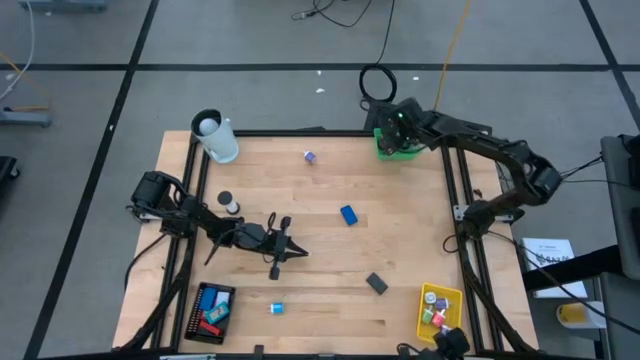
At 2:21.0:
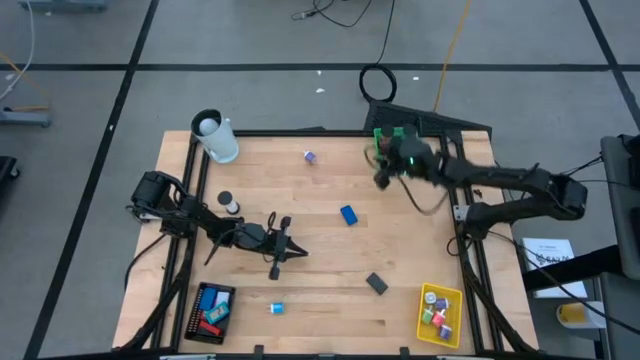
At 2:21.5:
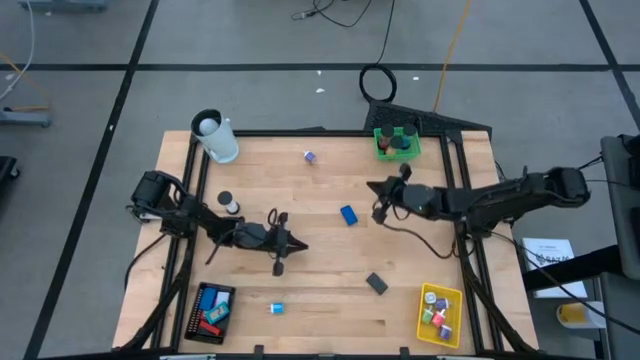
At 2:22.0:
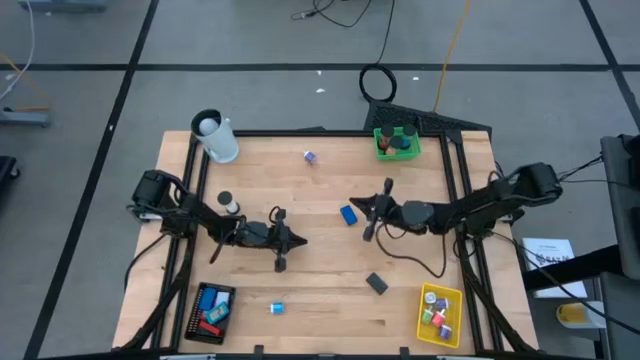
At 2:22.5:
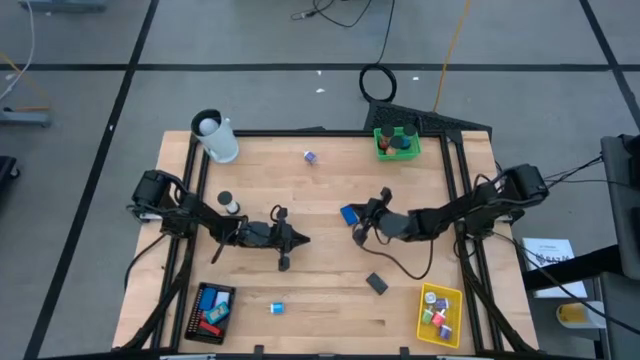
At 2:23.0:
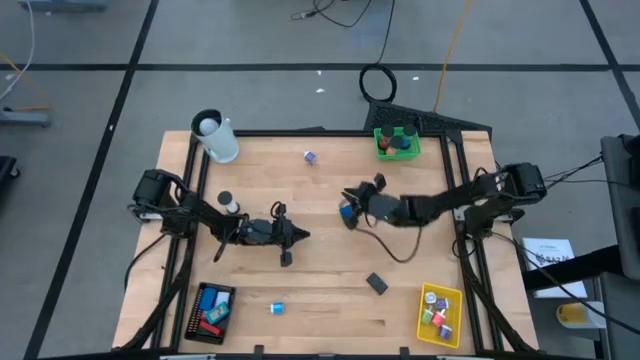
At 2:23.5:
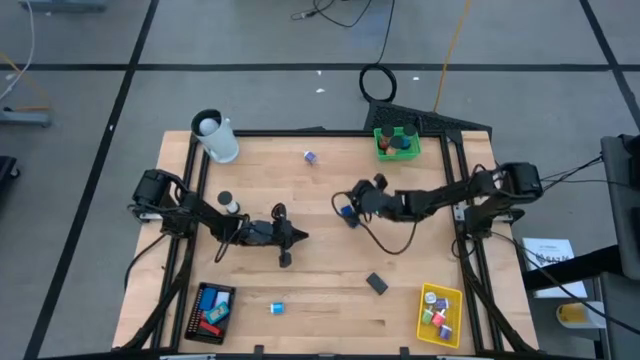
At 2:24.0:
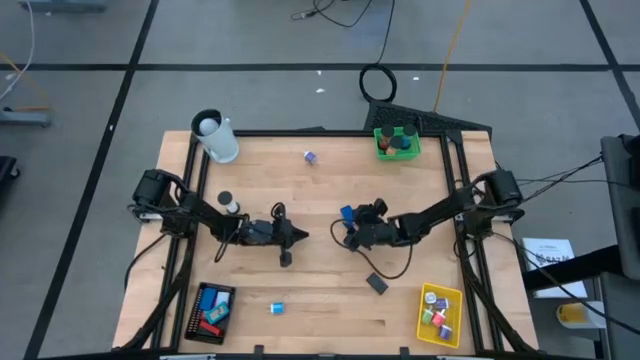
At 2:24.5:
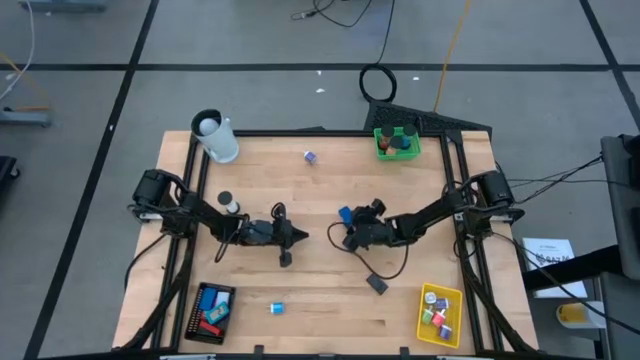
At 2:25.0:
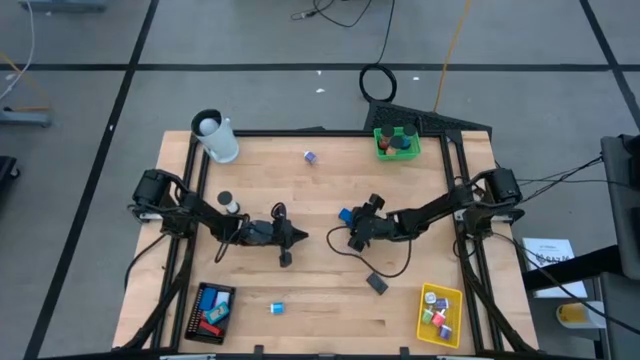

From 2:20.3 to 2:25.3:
Task: Pick & Place Office items
Put the blue digital clock into the black bin

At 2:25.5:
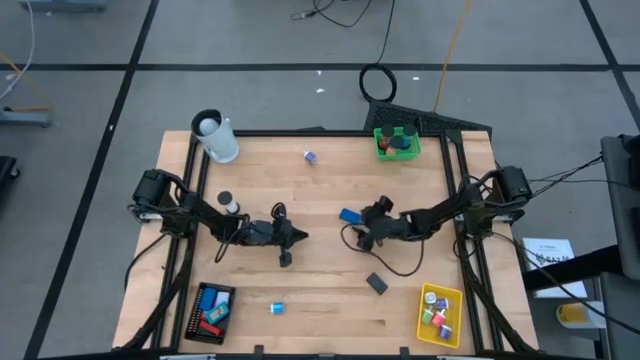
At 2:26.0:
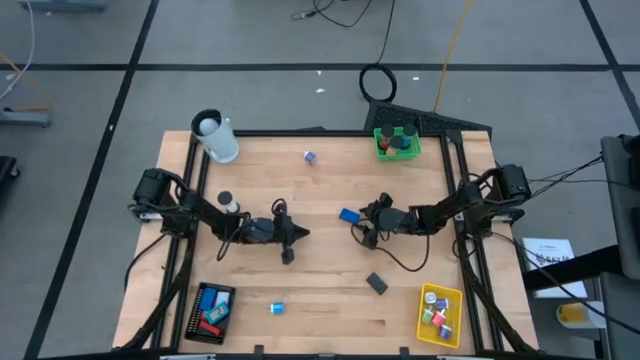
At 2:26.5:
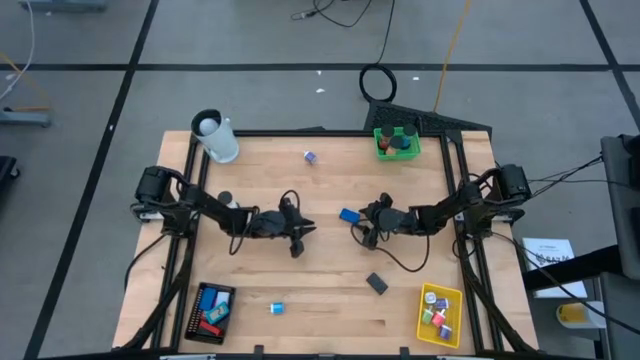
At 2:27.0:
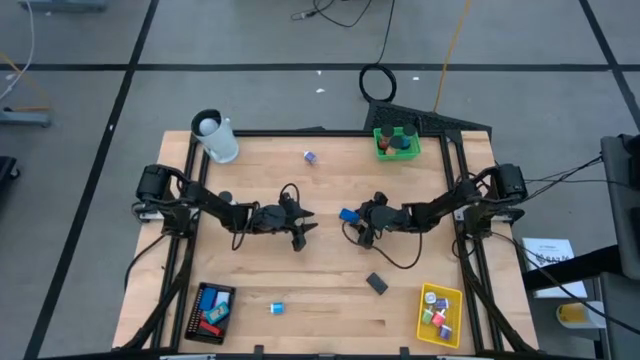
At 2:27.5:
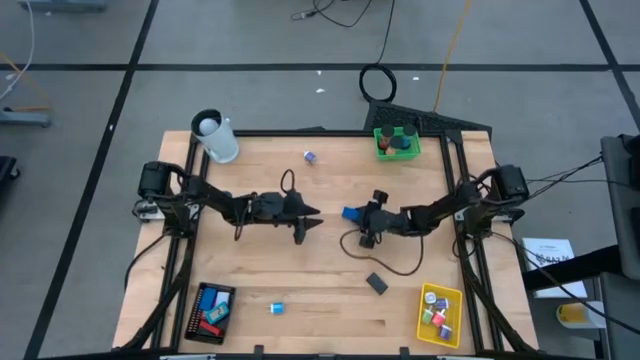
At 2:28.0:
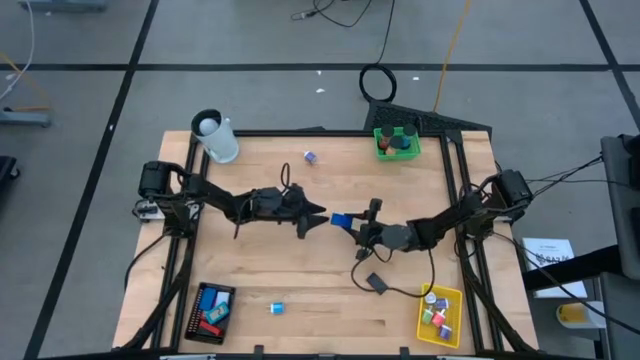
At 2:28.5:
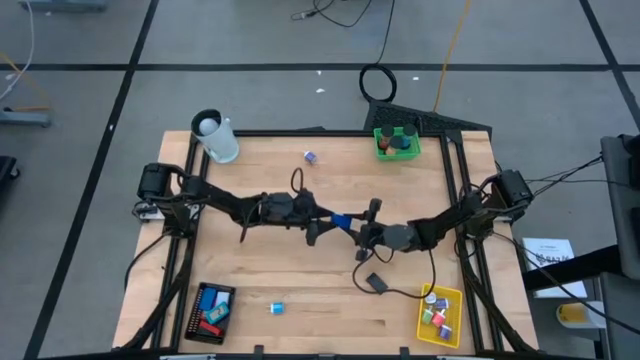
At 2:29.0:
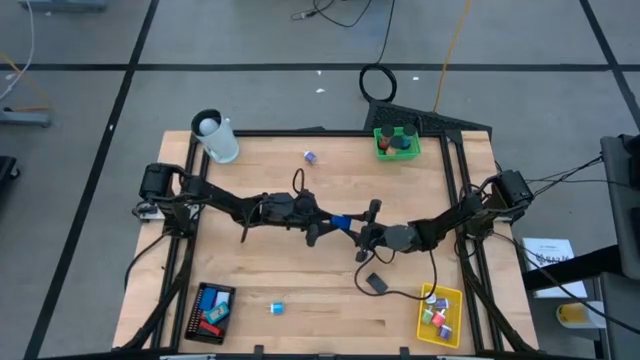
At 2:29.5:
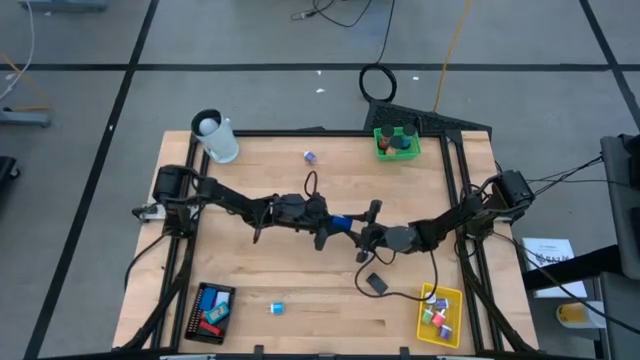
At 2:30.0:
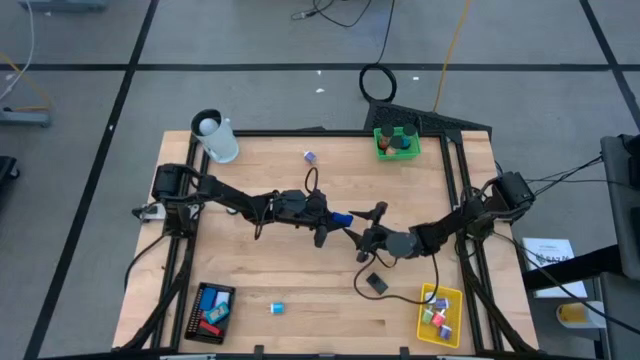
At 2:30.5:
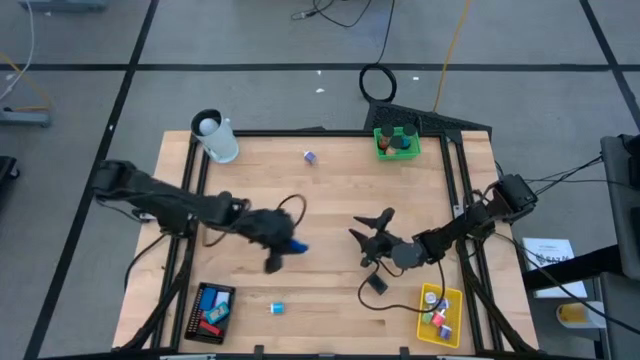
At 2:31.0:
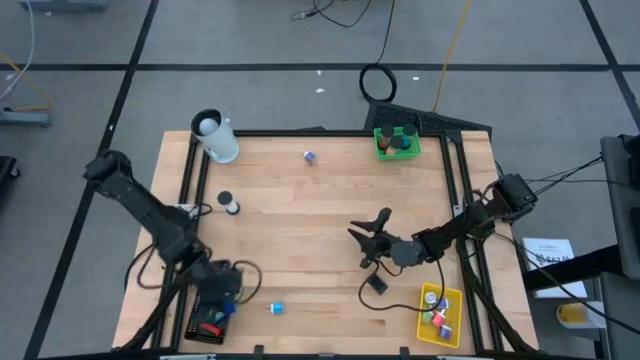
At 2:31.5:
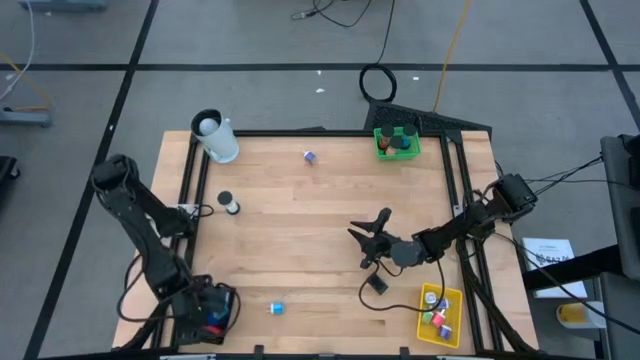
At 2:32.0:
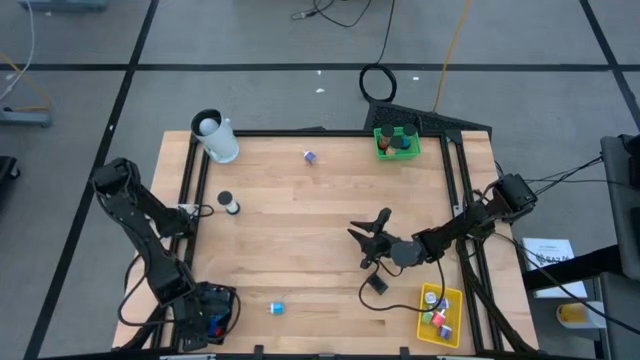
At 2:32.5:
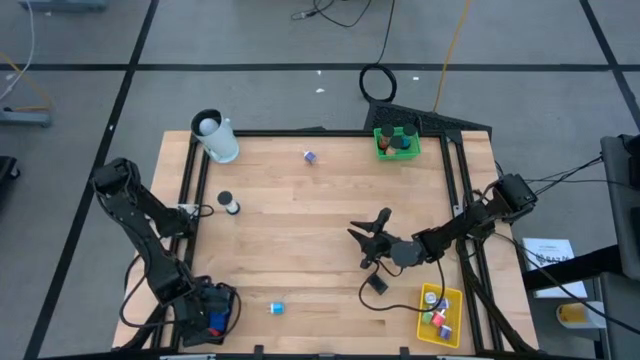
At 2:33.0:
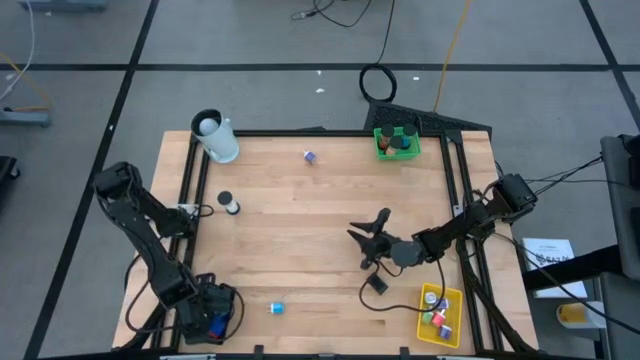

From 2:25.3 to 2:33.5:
Put the blue digital clock into the black bin

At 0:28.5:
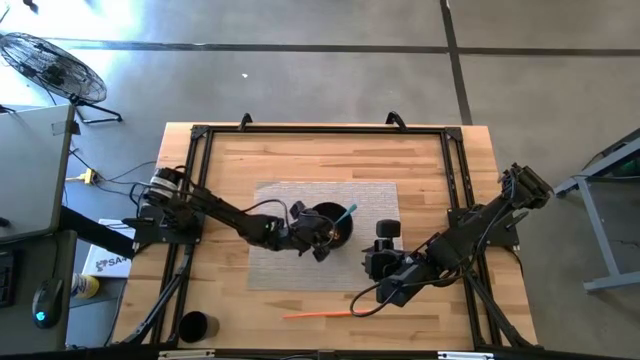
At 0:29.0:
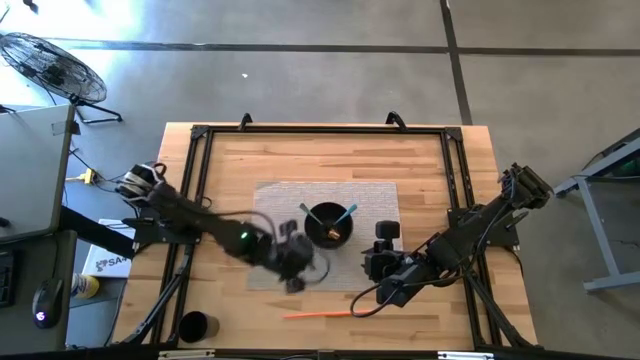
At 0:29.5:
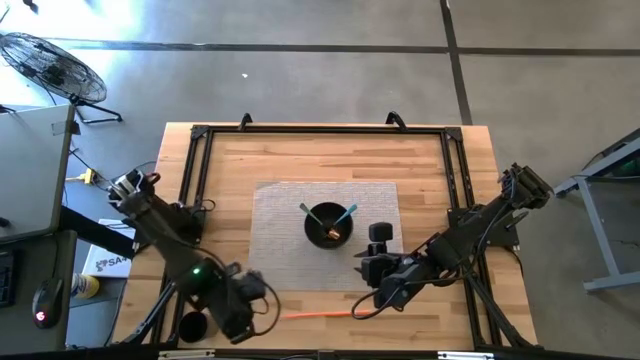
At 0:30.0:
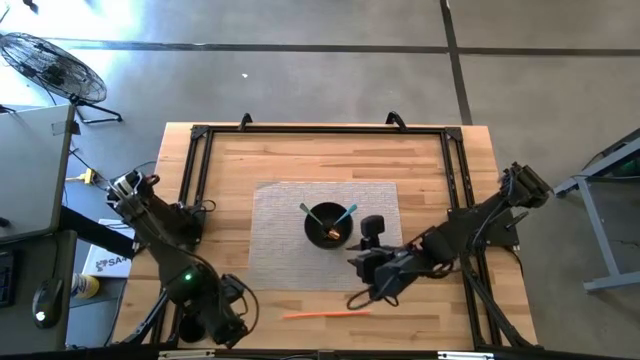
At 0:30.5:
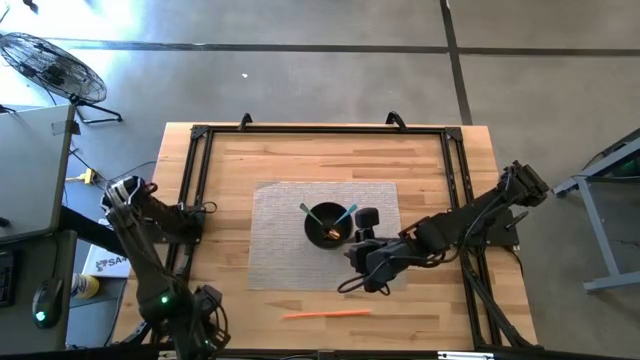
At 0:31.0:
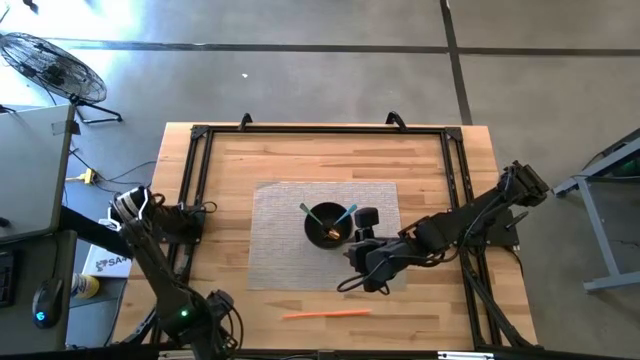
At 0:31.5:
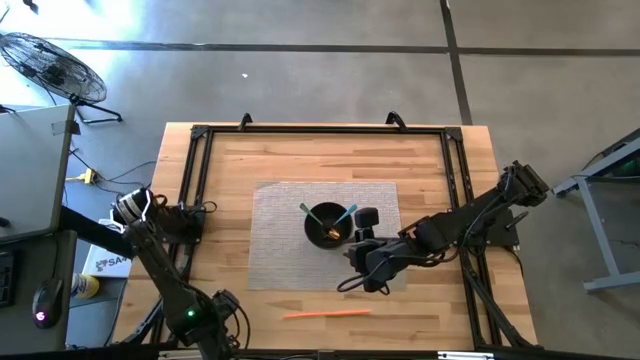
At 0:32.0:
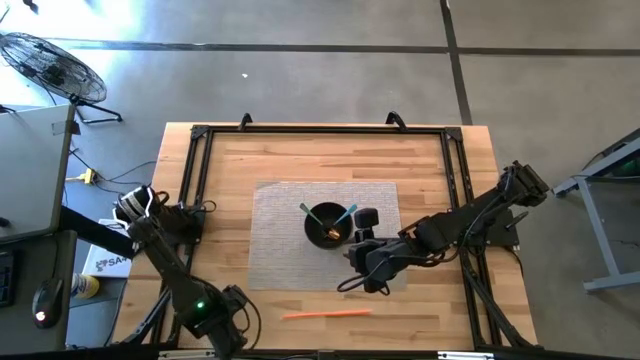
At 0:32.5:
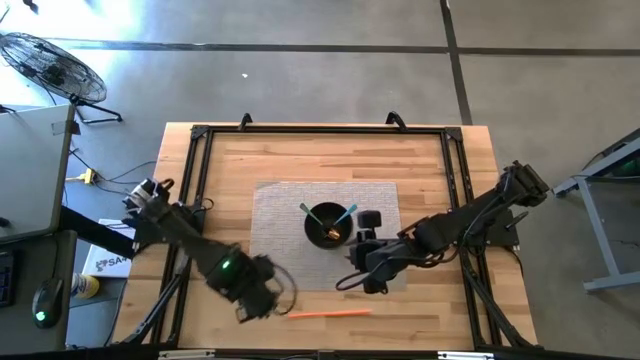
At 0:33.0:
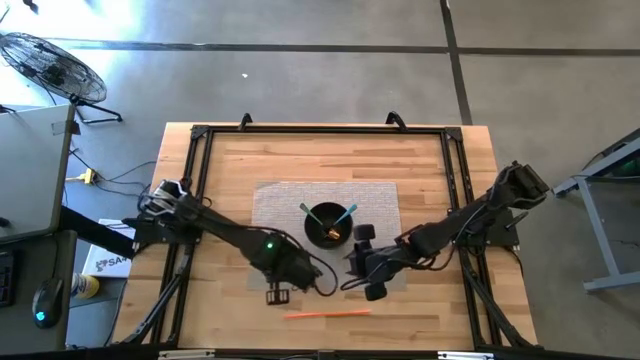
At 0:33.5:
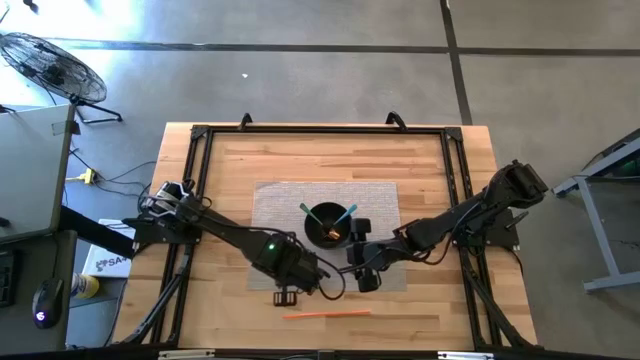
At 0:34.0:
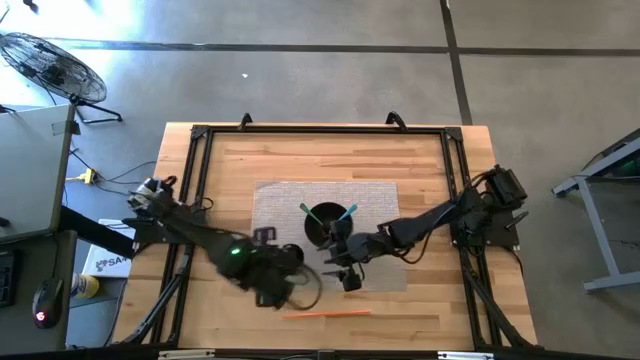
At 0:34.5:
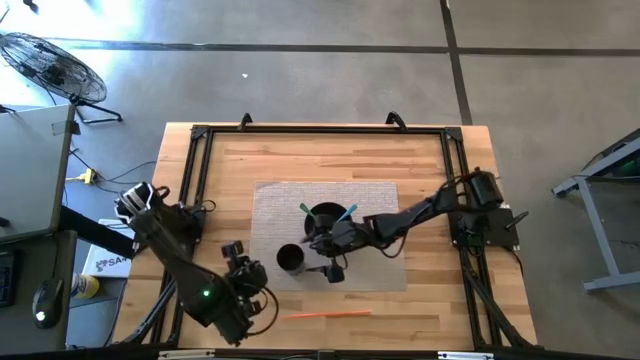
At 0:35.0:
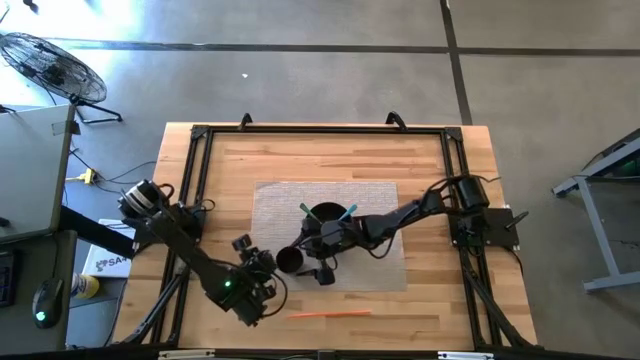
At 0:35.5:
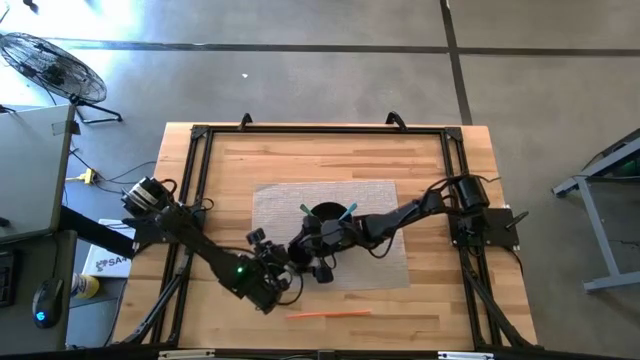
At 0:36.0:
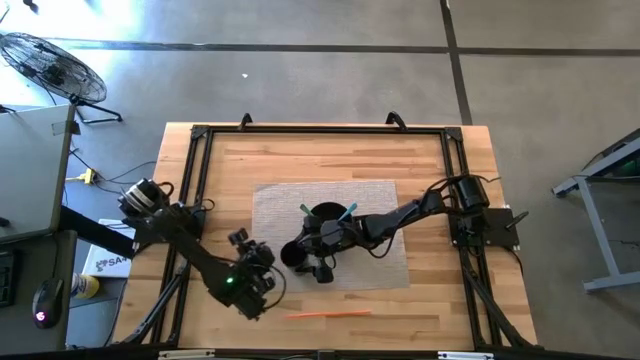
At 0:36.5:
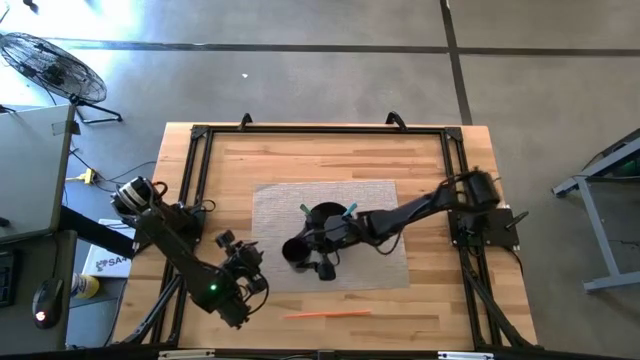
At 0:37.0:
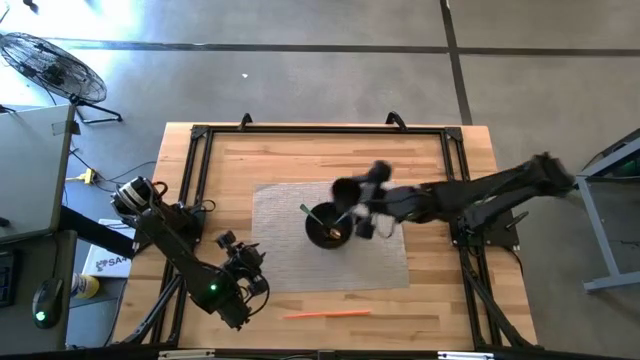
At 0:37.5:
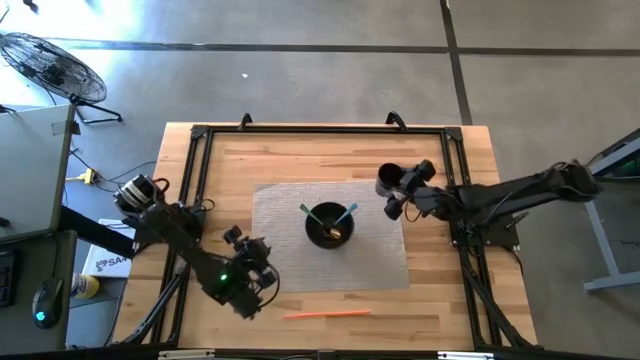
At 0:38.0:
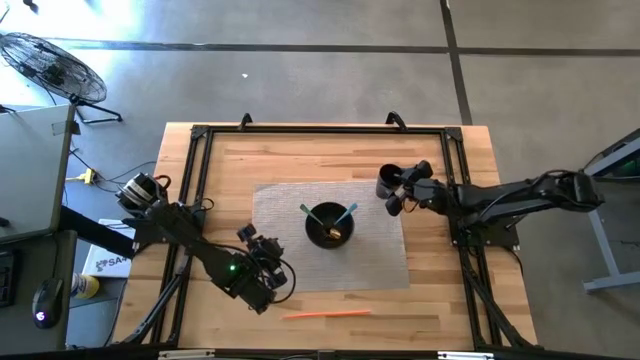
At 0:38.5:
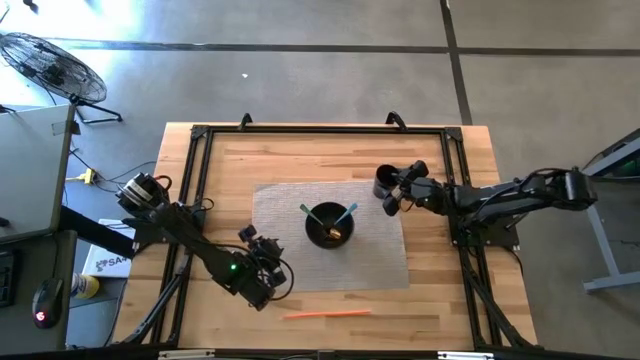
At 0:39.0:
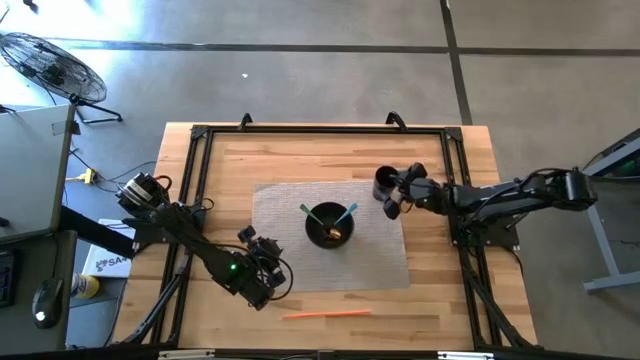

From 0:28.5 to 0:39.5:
Task: Pick & Place Utensil
Put the black cup to the top right of the black bowl on the gray mat
